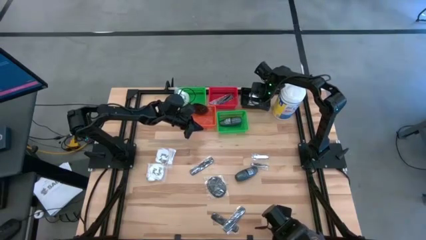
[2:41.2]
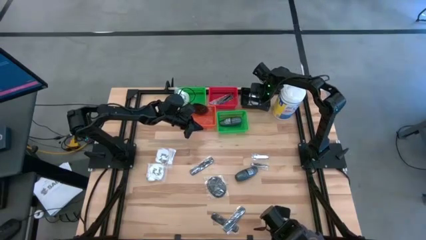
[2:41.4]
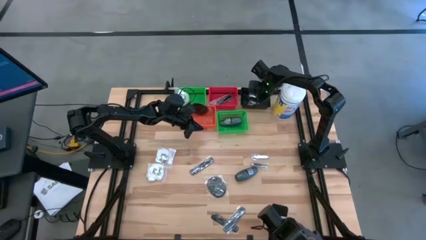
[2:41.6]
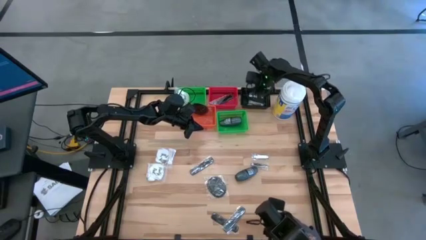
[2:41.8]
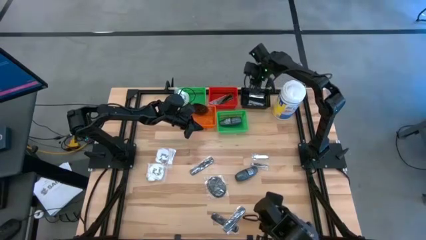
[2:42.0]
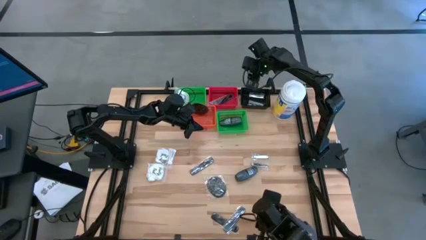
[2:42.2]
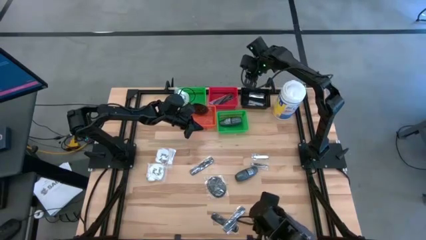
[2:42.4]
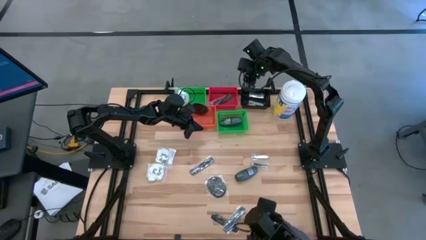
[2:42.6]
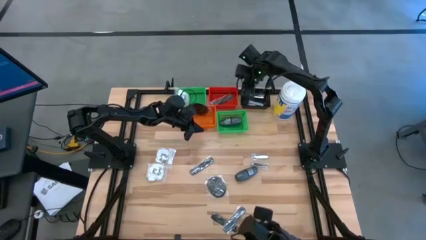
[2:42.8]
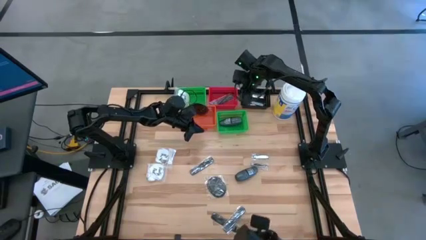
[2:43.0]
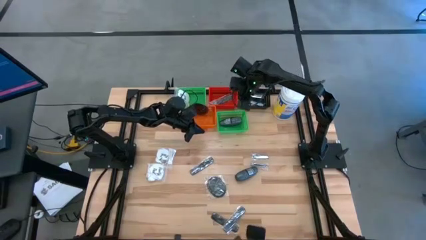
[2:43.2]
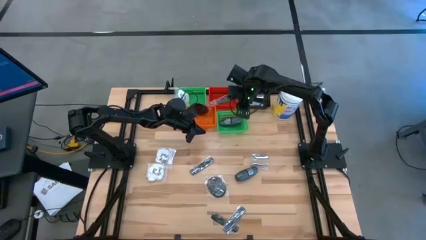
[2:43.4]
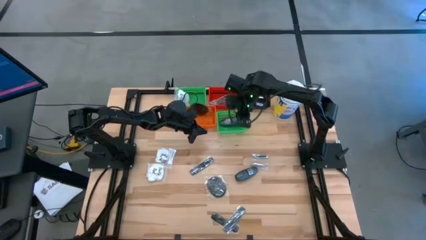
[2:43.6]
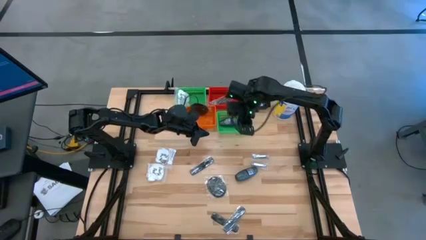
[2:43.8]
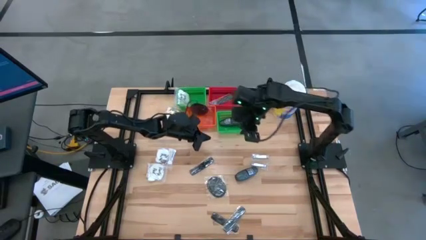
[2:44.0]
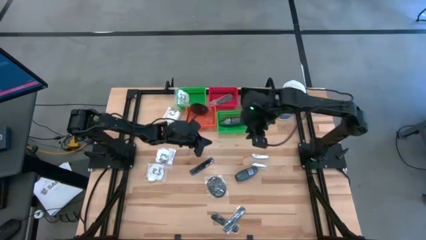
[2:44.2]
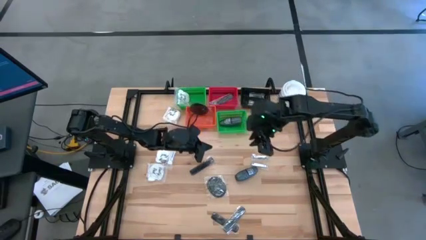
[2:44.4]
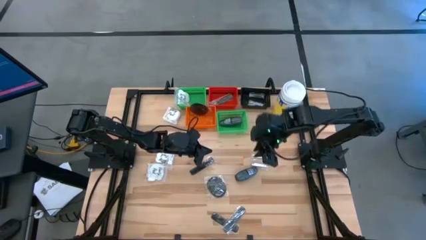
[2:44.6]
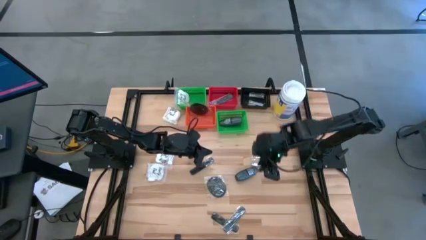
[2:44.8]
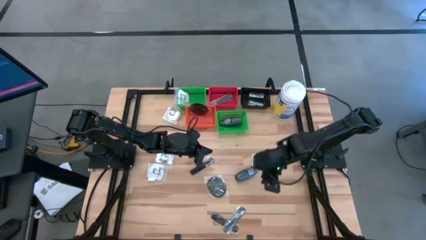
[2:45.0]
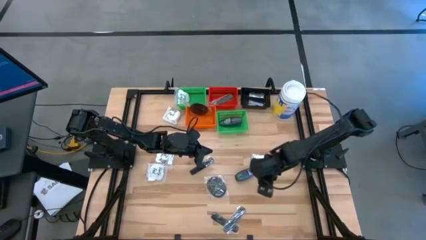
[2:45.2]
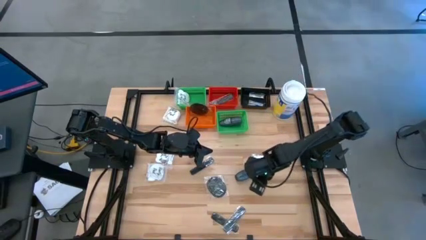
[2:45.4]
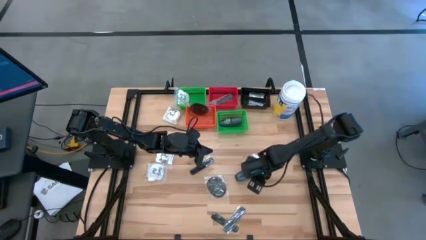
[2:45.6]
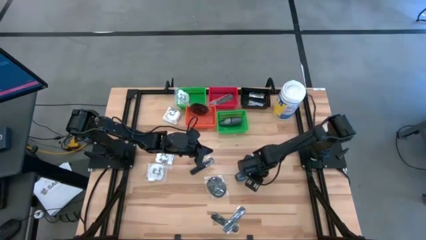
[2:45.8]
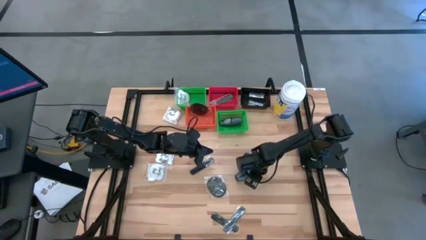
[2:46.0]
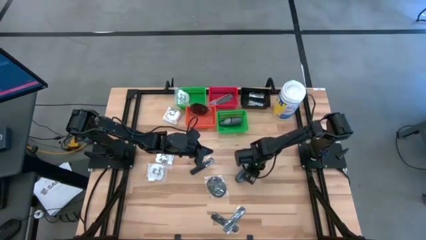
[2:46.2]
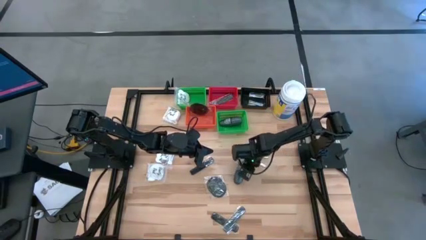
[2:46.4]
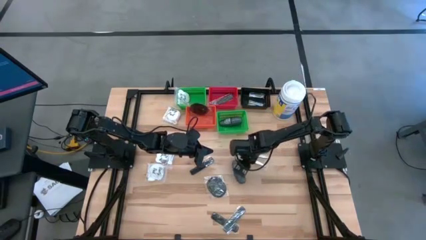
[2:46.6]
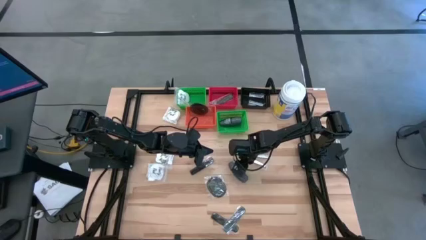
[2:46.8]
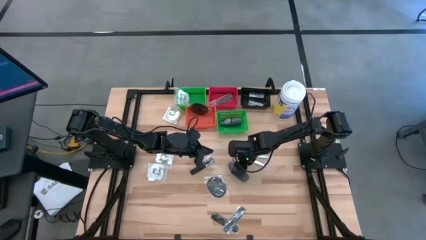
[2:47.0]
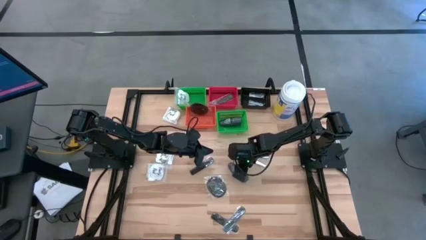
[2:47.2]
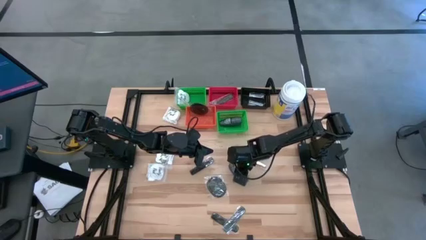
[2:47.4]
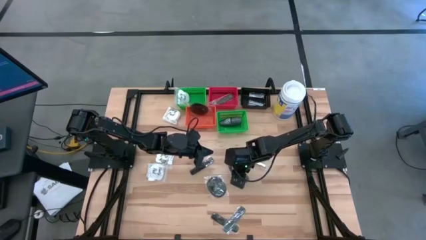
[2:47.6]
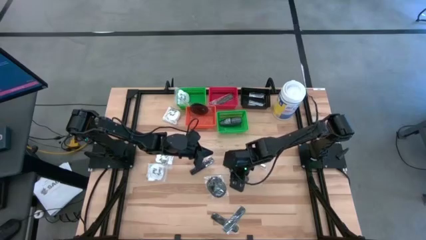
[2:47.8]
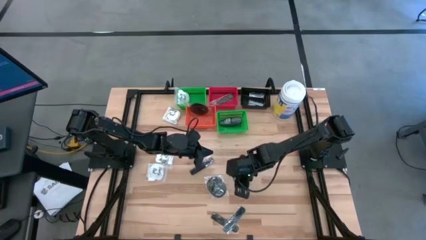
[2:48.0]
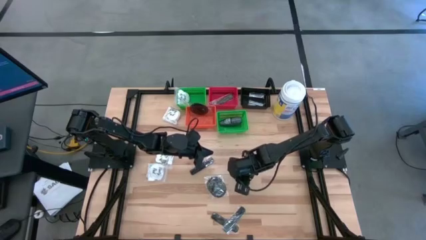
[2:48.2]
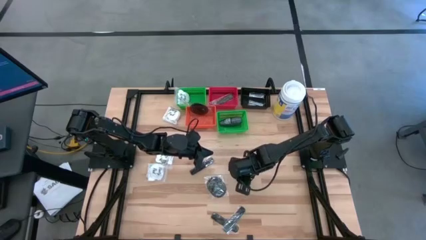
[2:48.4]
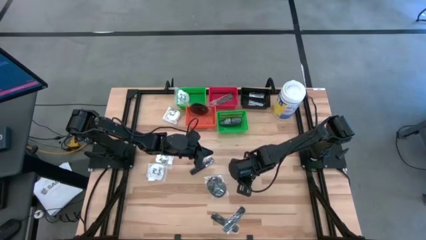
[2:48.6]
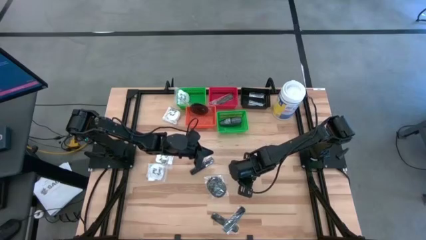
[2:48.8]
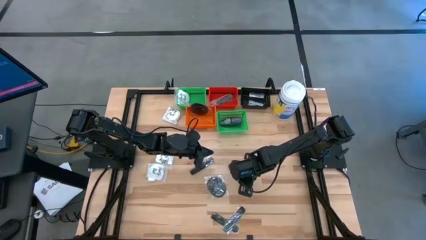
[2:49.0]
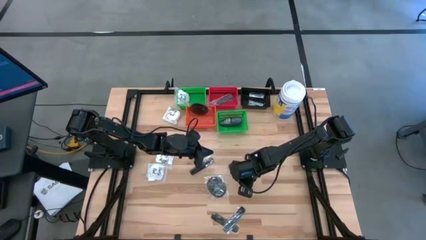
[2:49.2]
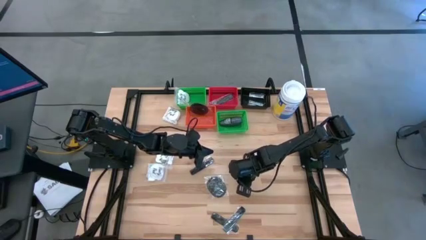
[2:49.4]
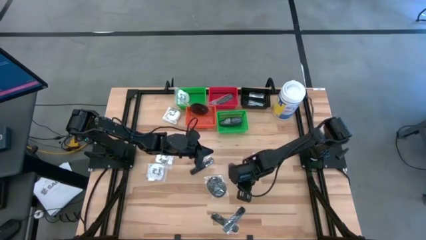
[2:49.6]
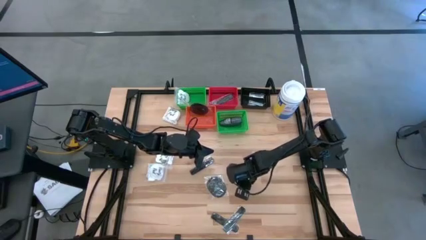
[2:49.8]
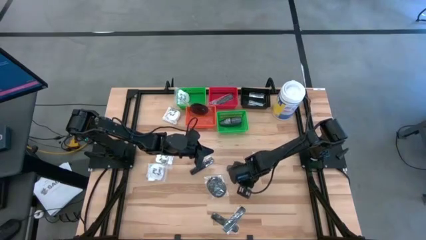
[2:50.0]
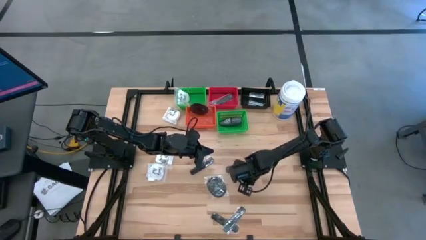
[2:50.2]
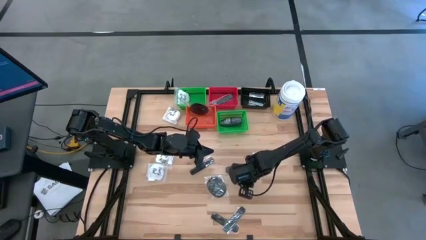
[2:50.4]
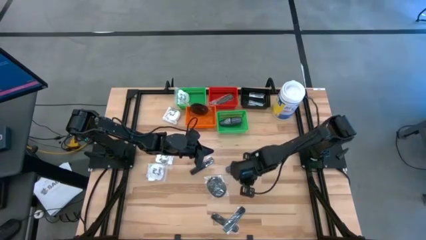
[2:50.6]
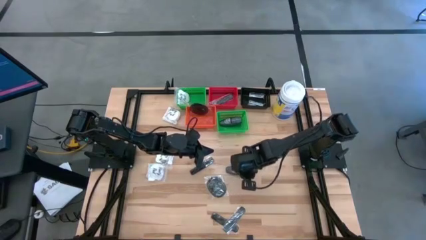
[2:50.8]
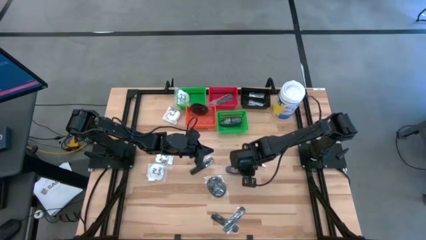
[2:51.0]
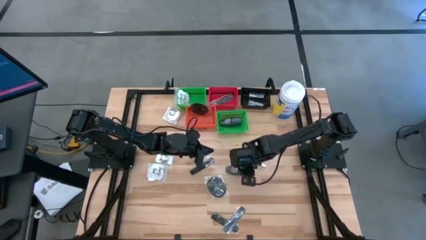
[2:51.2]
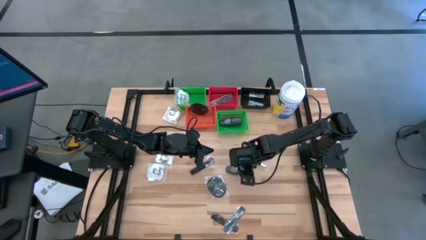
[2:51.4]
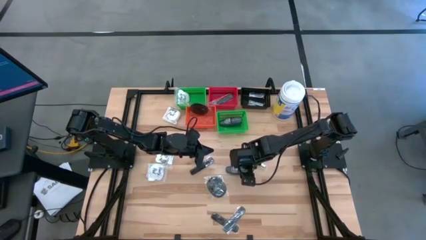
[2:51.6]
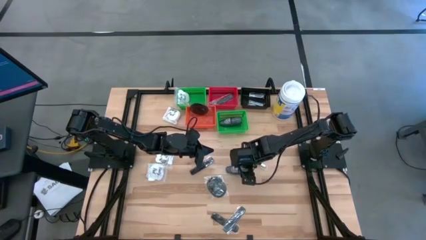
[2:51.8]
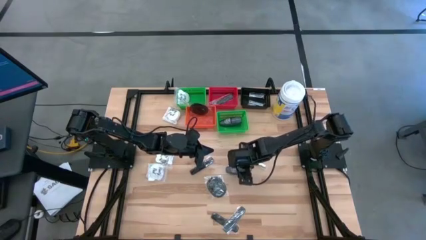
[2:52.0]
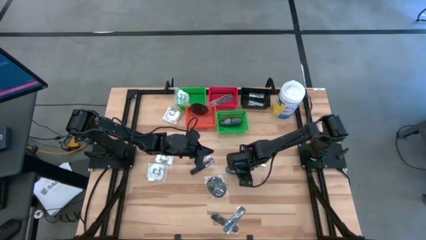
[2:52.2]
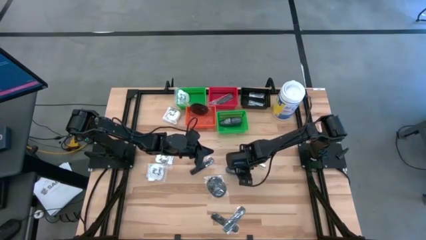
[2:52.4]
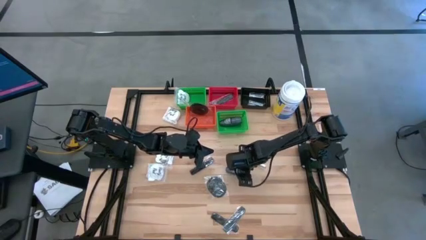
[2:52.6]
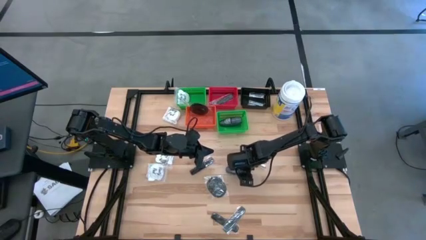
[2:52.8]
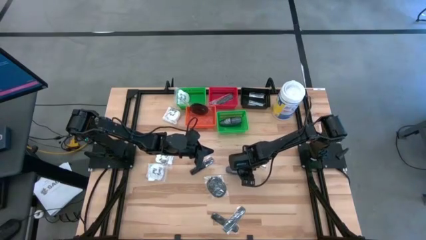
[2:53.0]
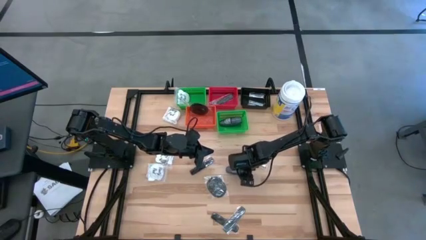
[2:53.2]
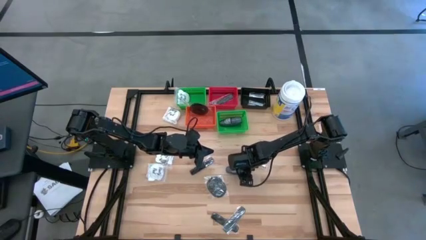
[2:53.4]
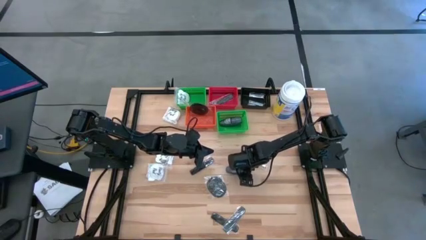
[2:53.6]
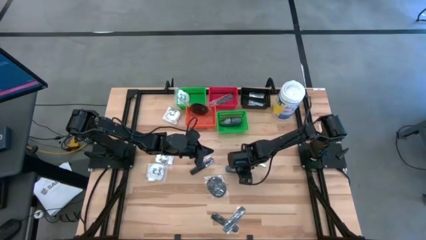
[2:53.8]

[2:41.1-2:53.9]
Task: Pick & Place Travel size toiletries
Put the black deodorant into the green bin

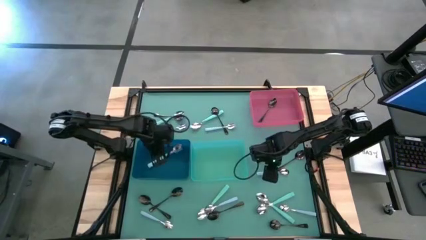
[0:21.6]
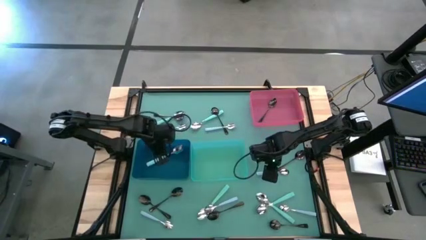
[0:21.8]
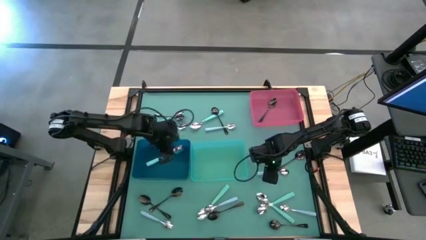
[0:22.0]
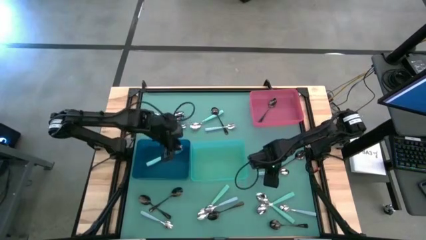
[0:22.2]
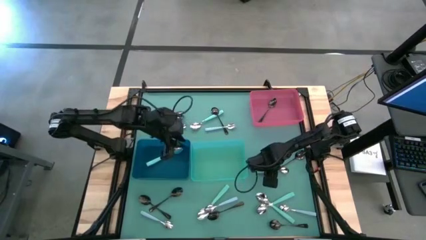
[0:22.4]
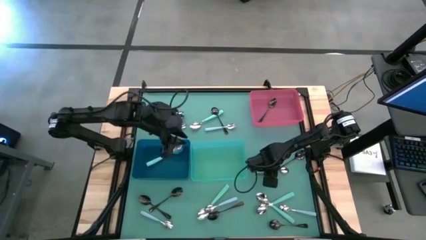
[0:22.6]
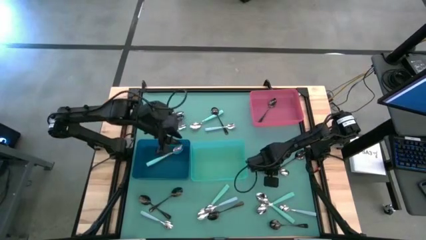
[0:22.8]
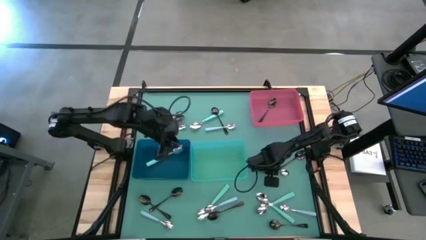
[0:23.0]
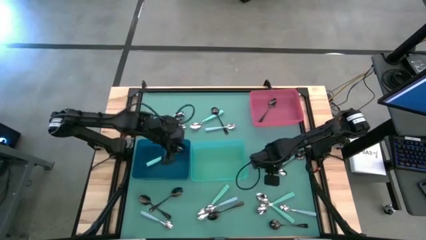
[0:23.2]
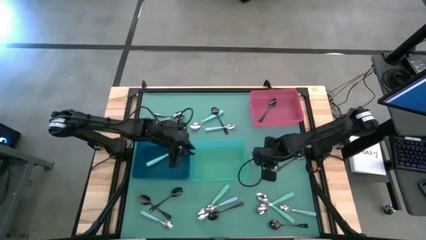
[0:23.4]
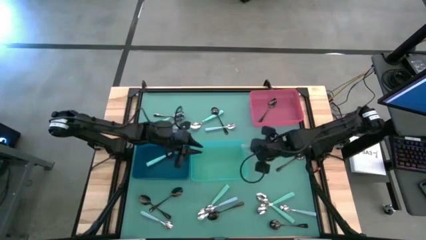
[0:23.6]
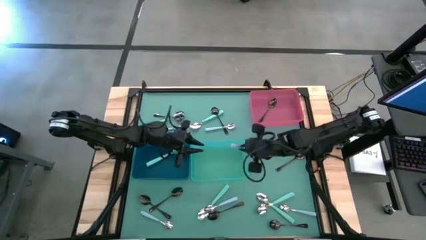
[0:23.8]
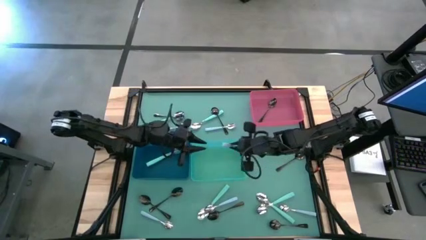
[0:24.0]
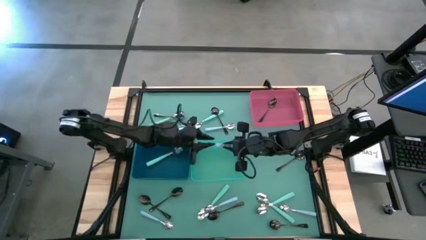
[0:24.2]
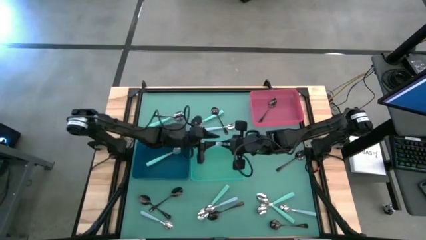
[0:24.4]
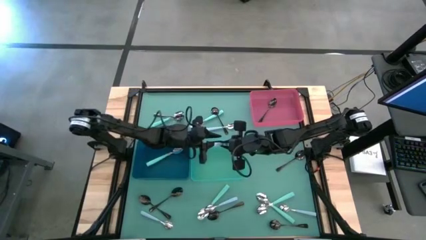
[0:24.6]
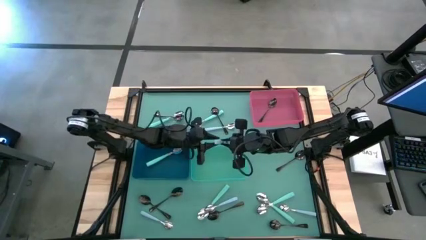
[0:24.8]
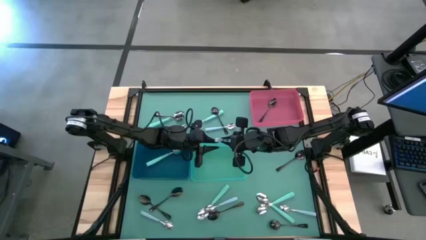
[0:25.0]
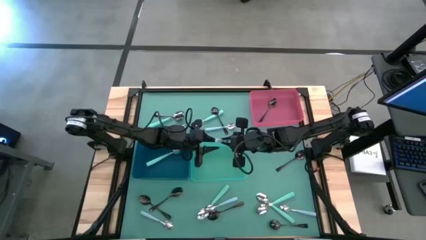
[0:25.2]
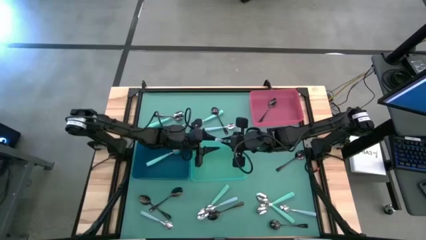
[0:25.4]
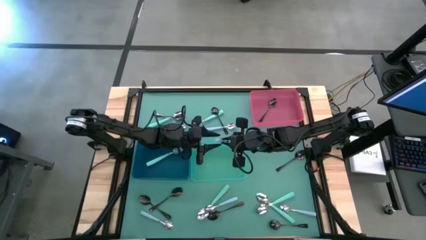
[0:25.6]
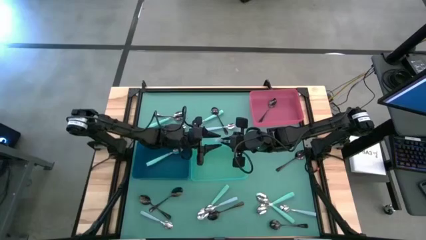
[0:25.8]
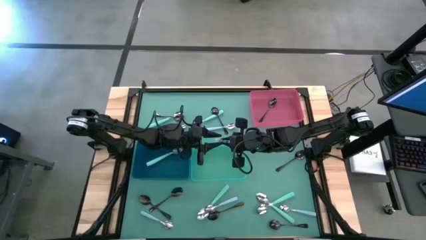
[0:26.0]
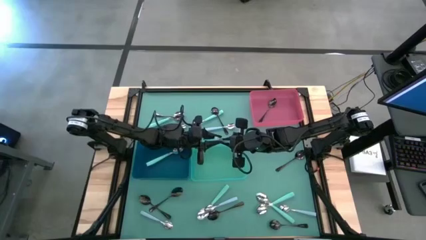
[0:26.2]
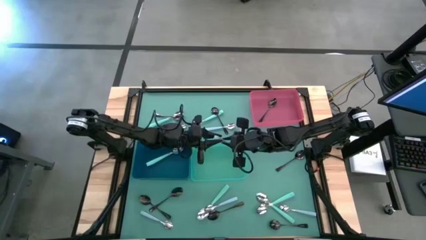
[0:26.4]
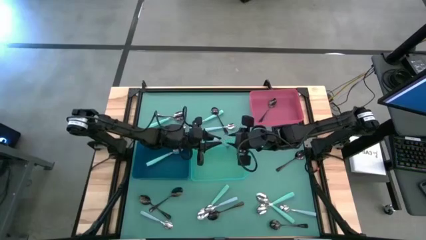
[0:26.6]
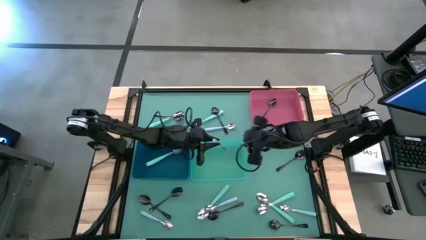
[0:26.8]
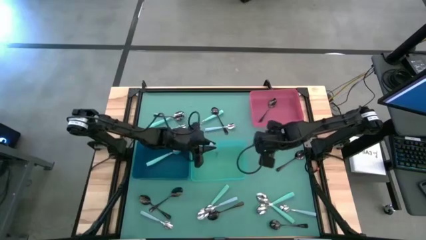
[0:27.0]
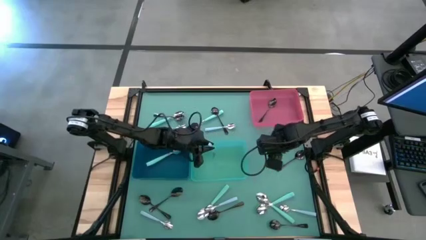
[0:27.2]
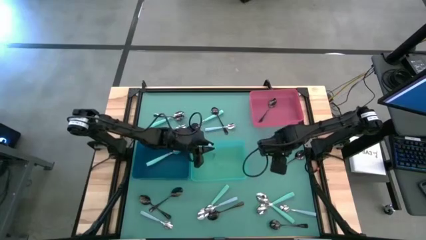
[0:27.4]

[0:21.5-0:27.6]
Task: Sort silverware by color (type)
Put the blue spoon into the green bin
